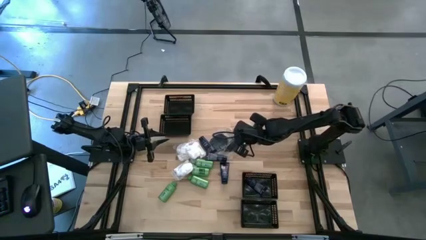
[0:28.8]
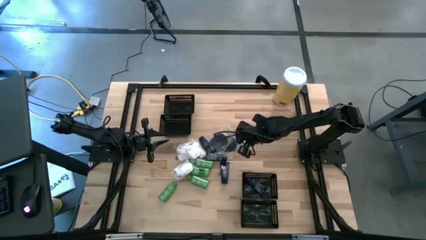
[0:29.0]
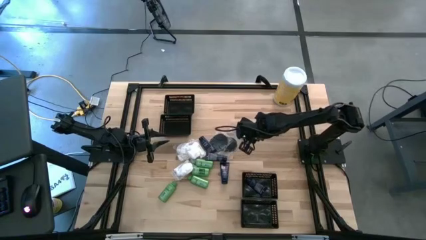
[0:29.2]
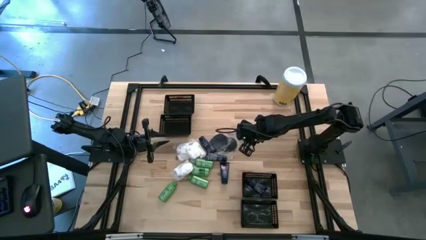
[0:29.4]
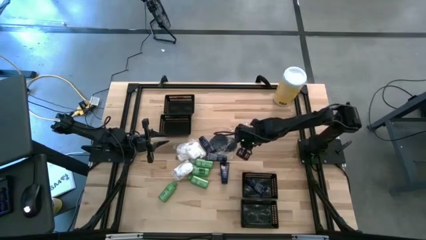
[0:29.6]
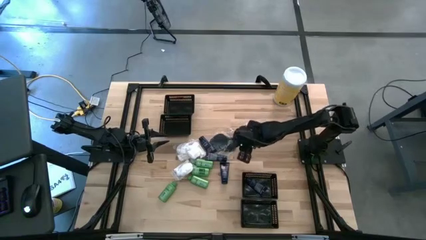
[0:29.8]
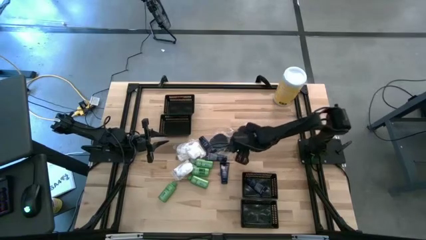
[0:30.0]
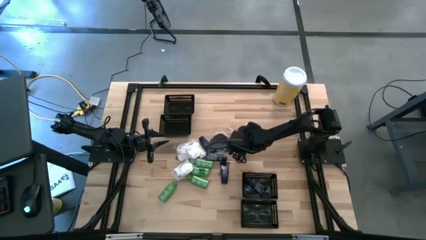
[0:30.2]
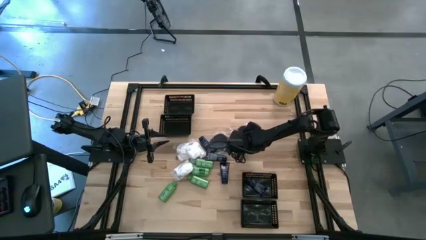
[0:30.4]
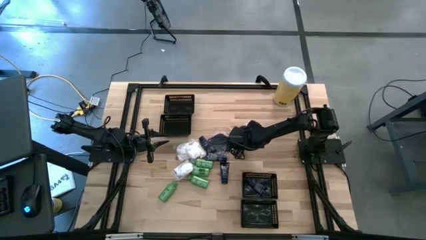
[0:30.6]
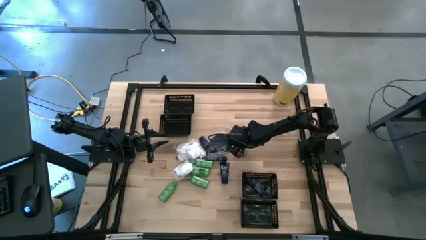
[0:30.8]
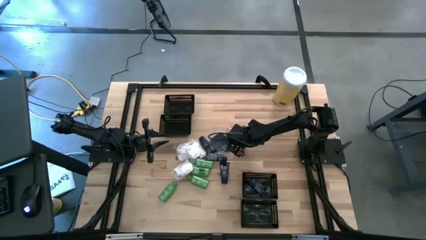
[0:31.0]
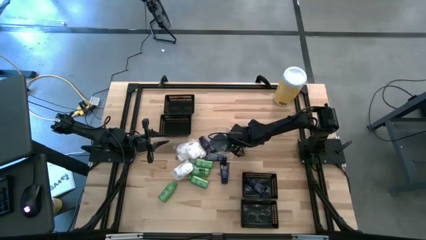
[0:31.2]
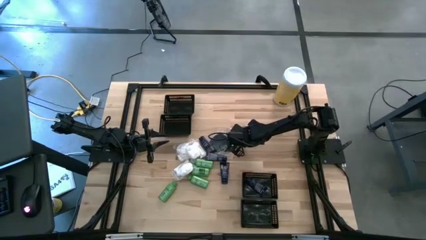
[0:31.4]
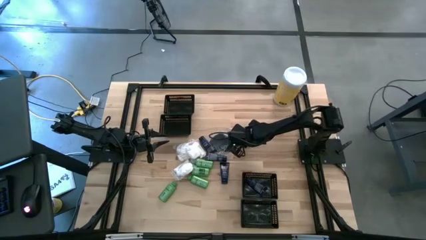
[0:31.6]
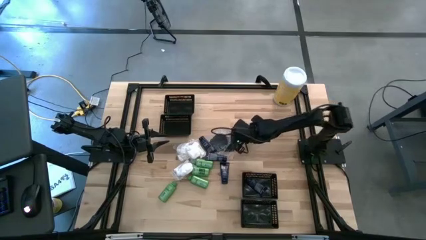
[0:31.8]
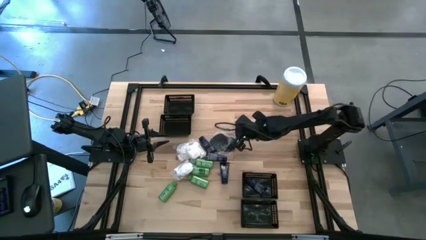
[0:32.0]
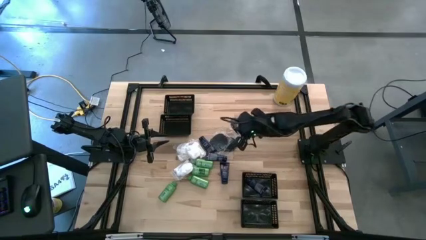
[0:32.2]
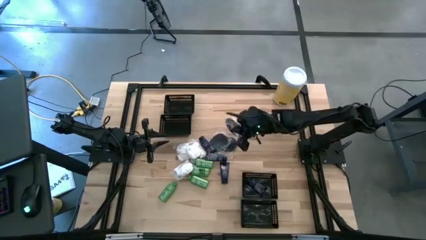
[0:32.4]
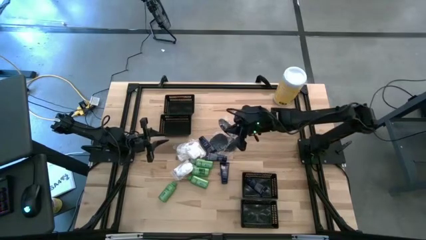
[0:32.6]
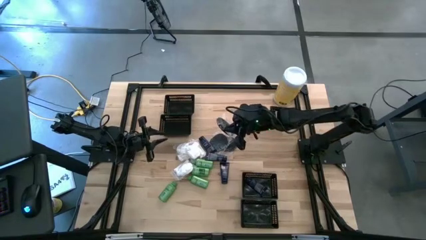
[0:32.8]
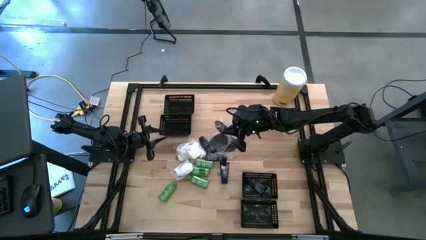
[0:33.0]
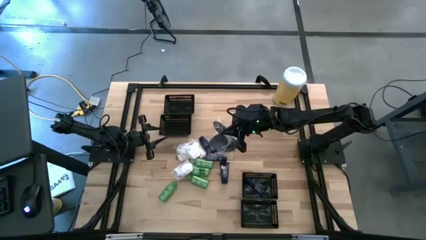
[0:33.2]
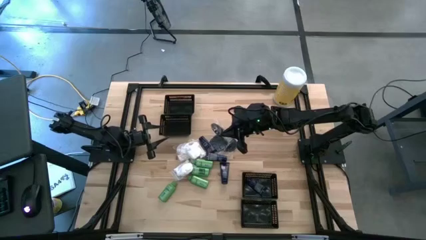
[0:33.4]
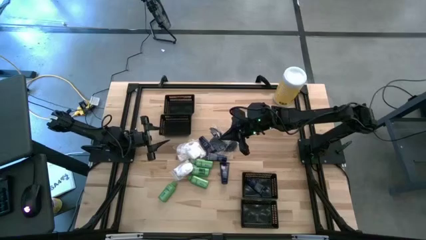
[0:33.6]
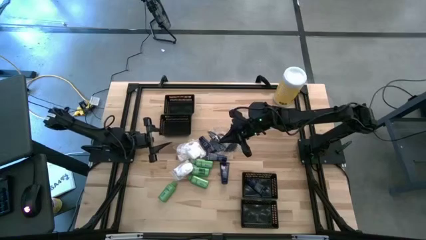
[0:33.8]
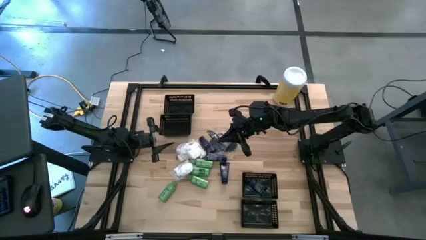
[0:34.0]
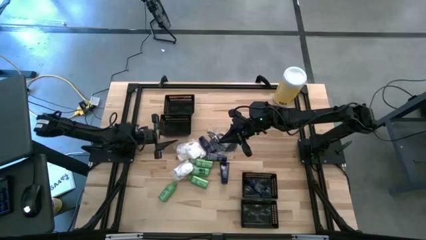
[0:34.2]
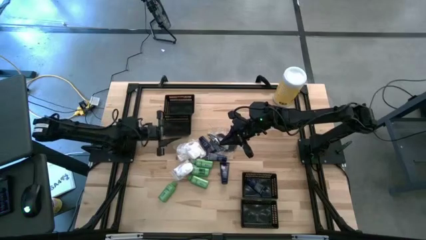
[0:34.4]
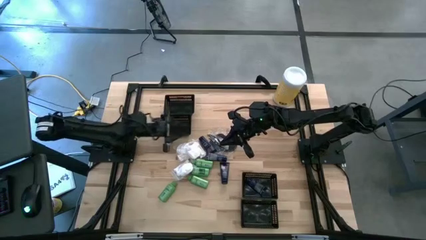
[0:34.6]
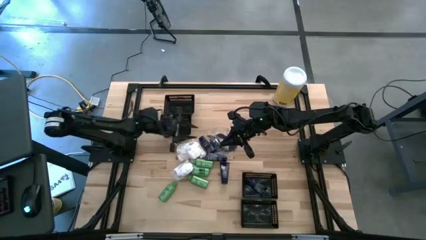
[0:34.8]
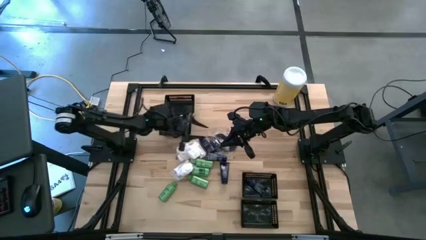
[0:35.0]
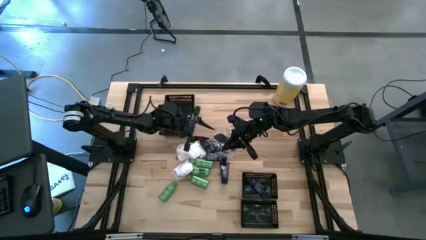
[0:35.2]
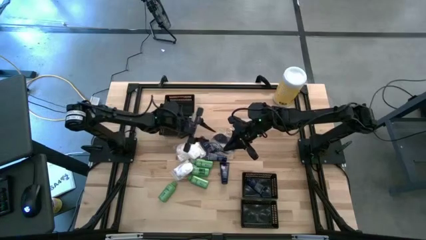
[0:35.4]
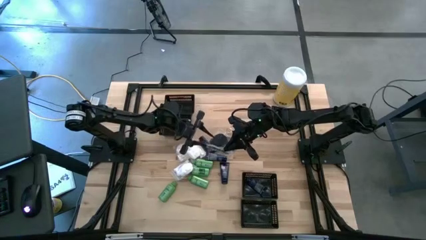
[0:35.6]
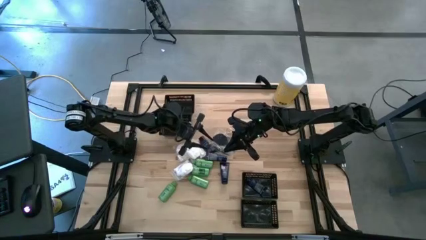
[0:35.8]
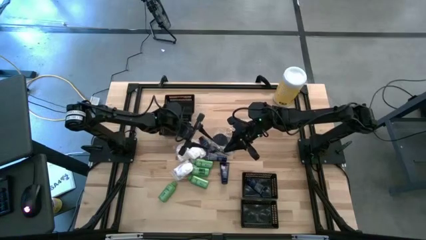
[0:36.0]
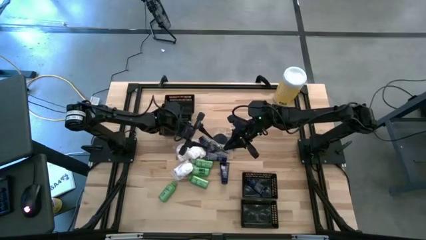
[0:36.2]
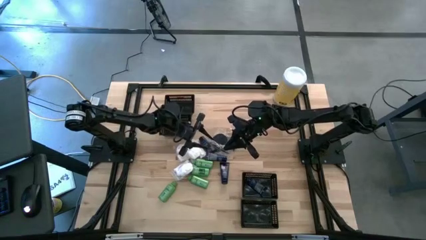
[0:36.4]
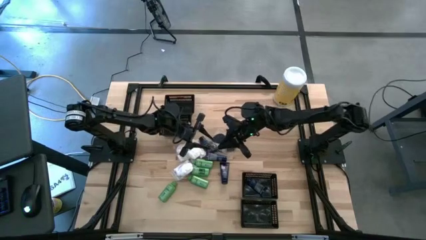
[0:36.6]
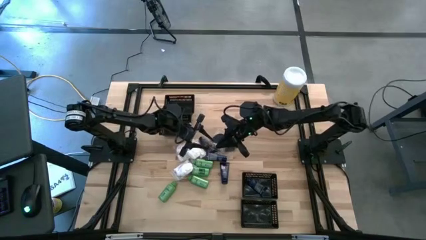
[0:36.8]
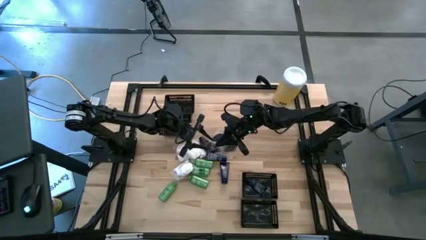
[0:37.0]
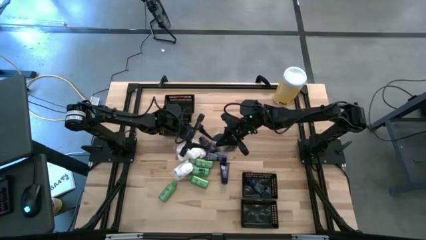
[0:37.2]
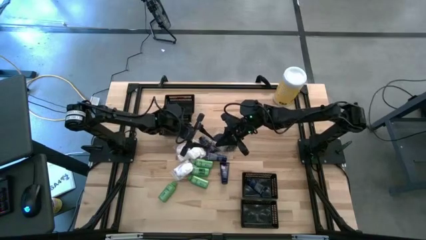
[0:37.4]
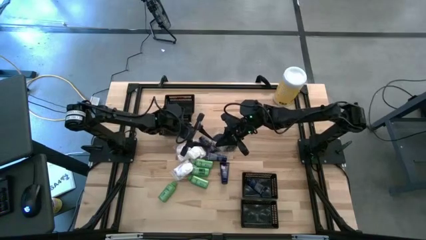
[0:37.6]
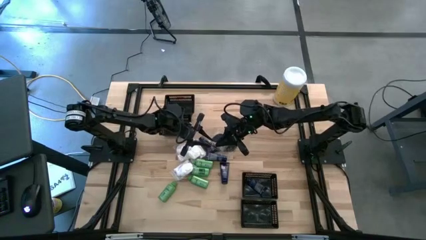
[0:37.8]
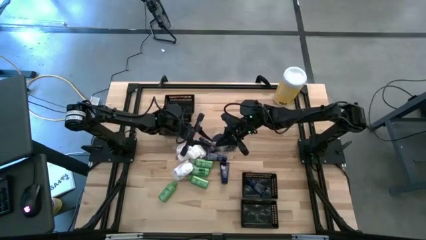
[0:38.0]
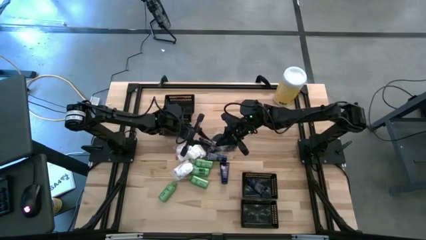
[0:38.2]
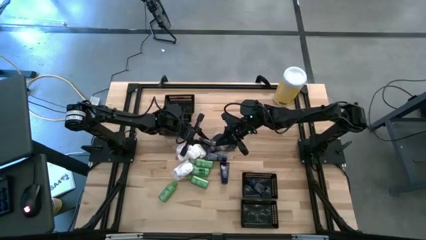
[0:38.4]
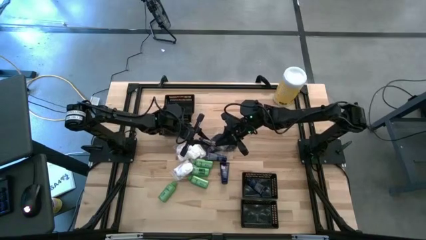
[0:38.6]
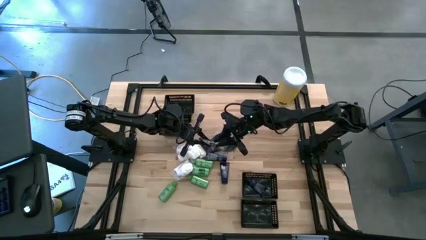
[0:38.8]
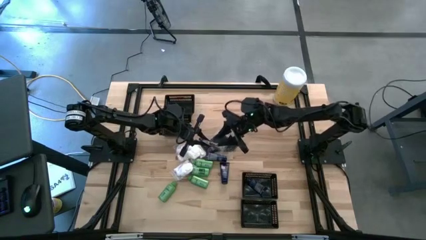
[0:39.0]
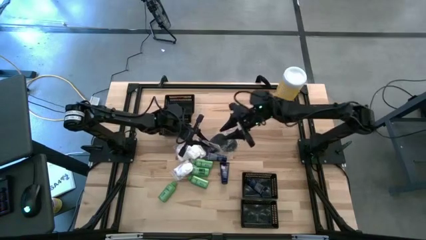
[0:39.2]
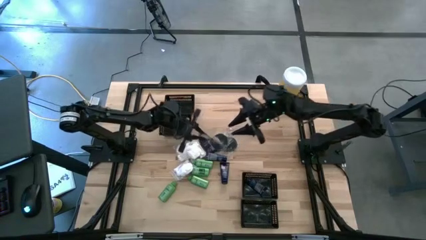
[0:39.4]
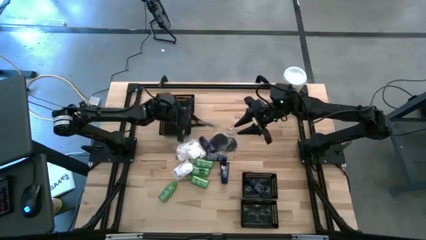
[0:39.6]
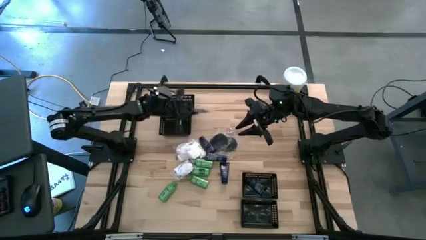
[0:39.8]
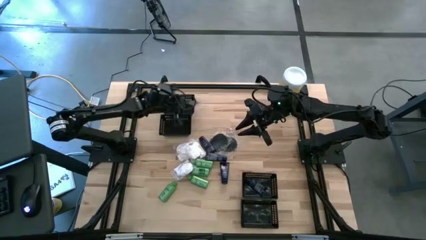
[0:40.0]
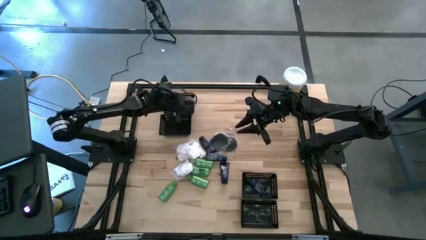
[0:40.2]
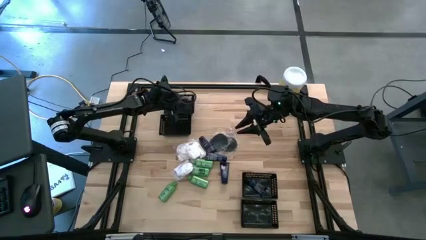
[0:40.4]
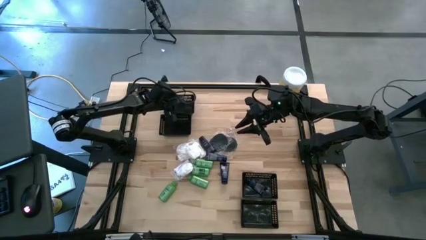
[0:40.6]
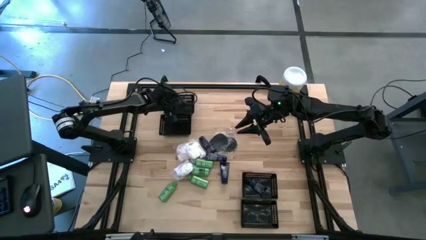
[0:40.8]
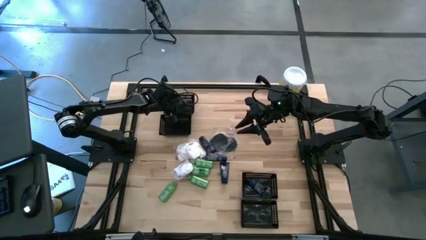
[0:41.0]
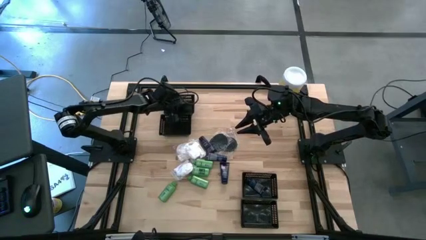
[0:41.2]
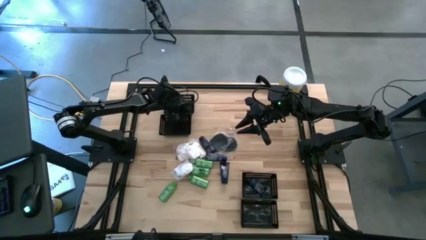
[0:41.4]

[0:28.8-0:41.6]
Task: Pick & Place Travel size toiletries
Put the black hairbrush into the top black basket
